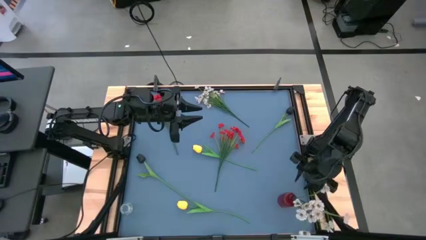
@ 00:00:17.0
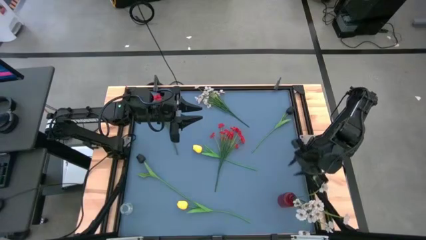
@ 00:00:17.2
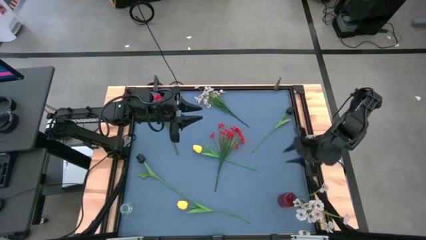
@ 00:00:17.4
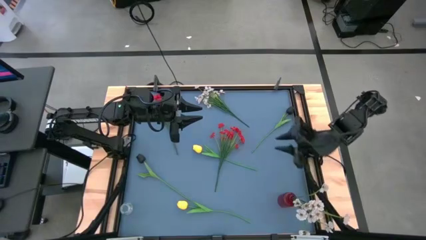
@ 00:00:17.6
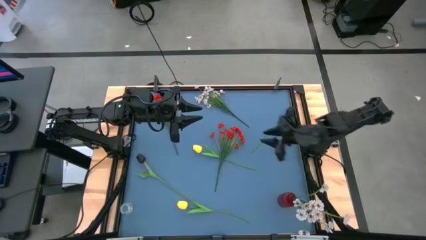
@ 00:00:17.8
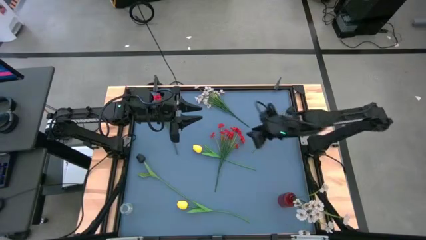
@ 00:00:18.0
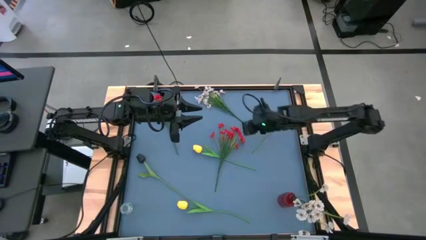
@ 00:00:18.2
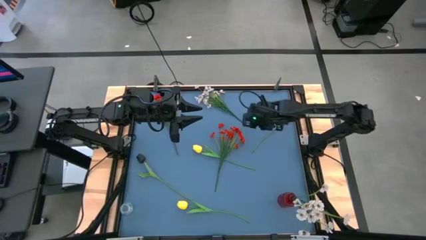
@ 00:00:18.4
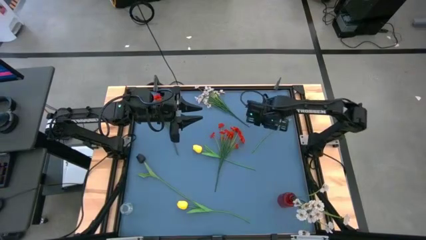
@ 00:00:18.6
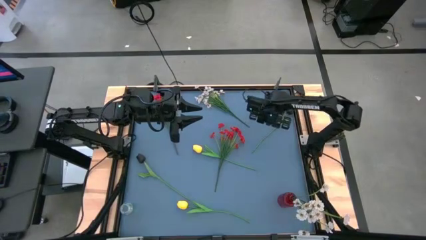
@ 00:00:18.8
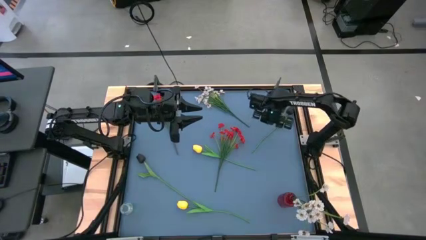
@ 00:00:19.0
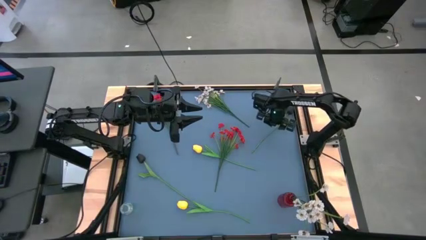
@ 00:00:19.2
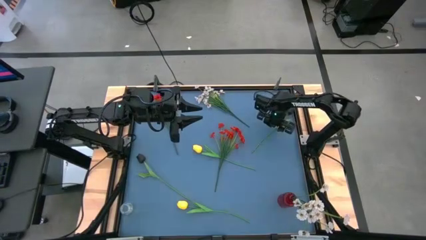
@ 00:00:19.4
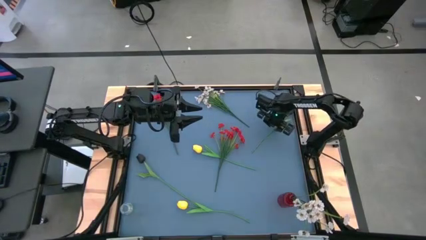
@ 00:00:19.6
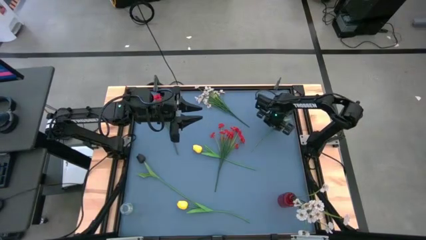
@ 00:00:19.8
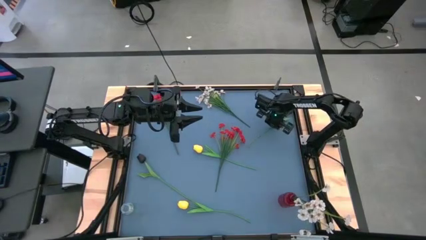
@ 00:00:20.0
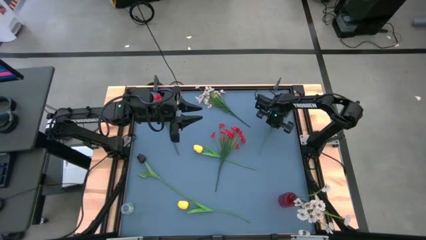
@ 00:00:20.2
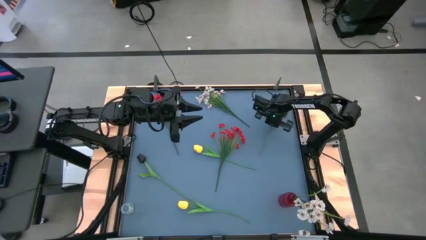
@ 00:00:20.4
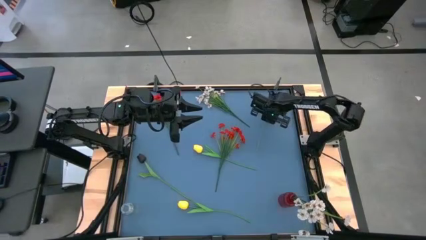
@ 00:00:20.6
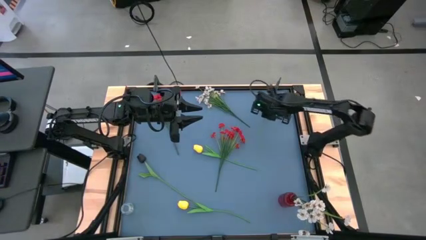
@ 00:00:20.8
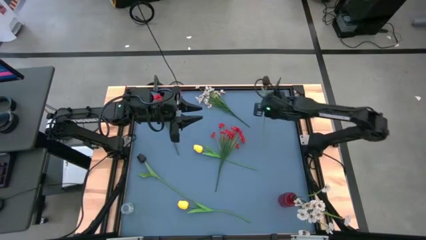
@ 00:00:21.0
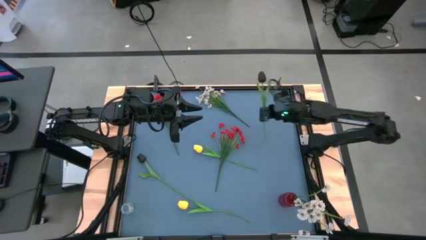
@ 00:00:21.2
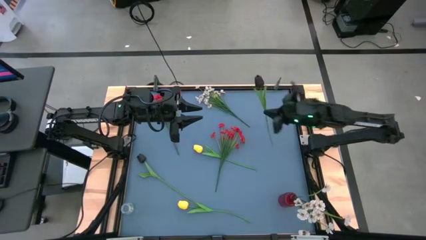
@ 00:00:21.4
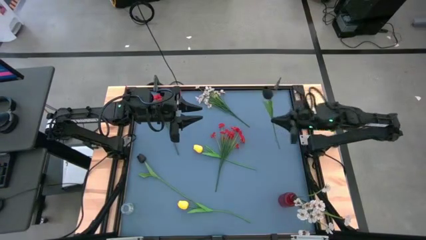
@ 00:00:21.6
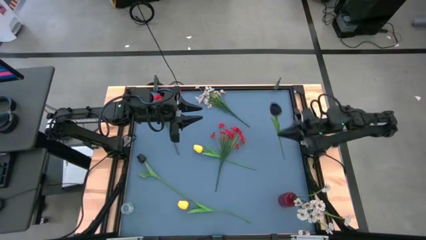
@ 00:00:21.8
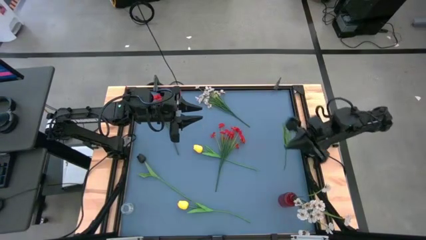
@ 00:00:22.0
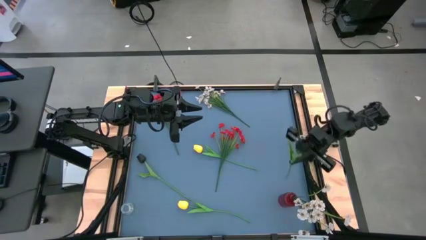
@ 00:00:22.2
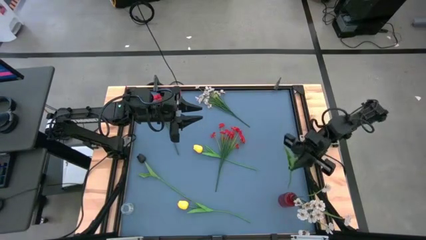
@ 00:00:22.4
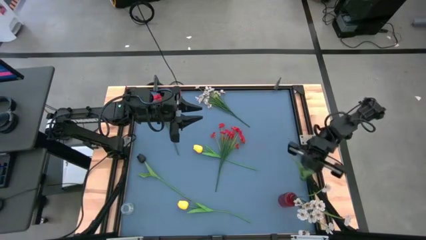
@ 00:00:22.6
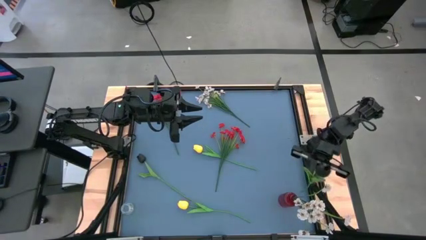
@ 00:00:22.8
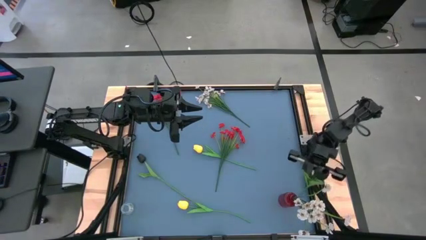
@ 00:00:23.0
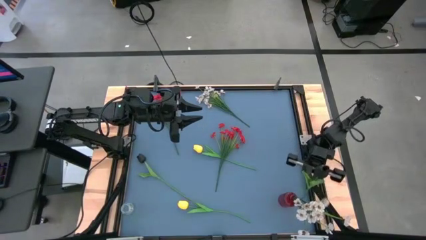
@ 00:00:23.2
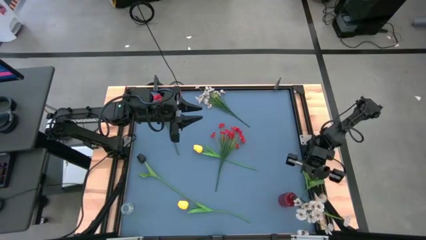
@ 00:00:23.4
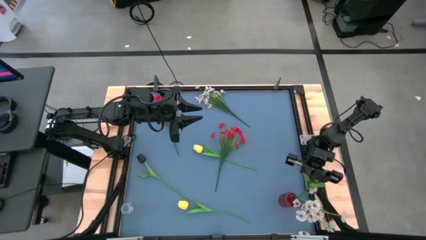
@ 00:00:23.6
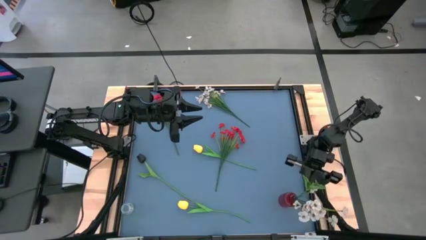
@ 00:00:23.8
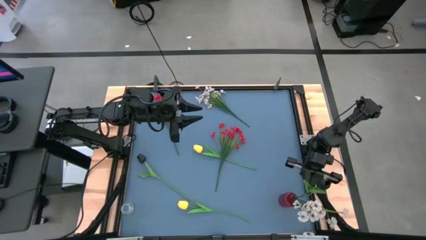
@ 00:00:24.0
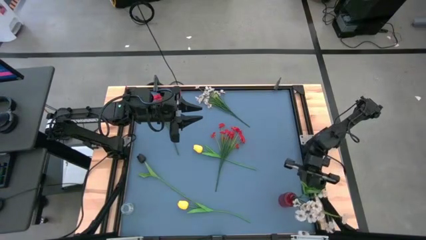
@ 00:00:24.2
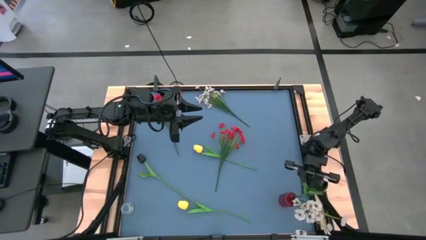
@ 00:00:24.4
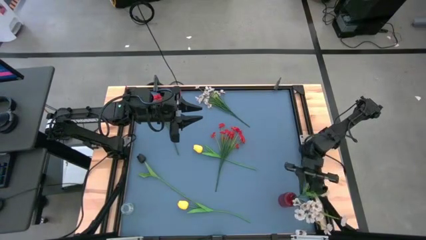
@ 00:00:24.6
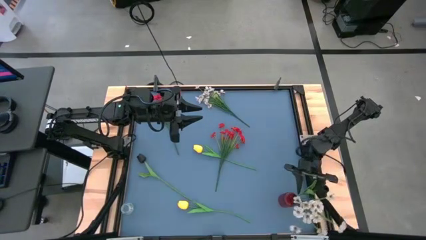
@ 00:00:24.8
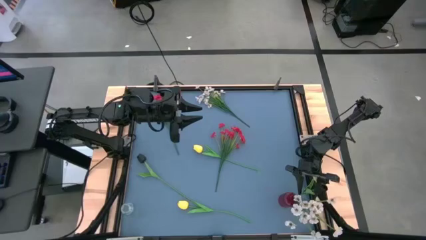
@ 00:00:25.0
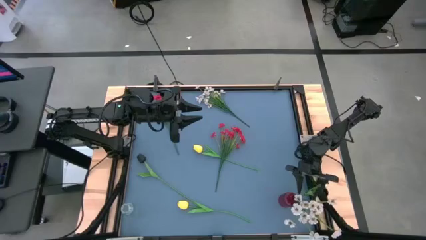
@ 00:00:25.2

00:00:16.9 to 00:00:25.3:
Task: Sort flowers into vase by color
Put the top black tulip into the red vase

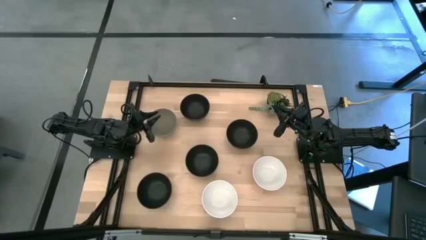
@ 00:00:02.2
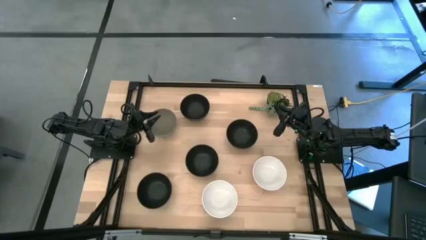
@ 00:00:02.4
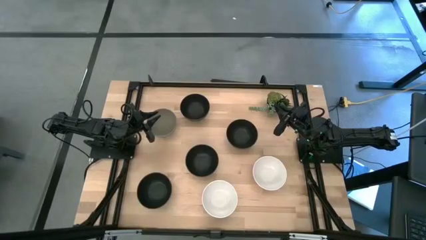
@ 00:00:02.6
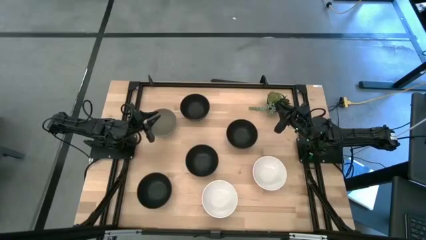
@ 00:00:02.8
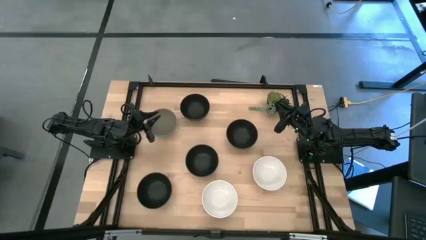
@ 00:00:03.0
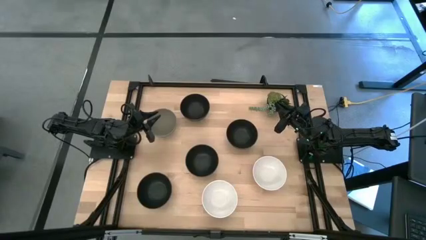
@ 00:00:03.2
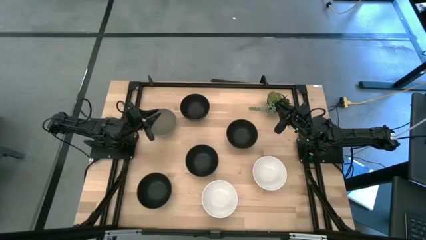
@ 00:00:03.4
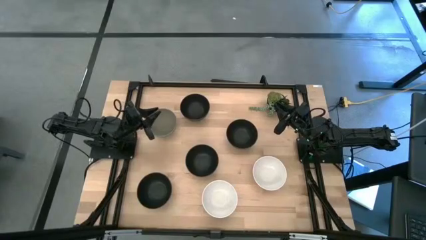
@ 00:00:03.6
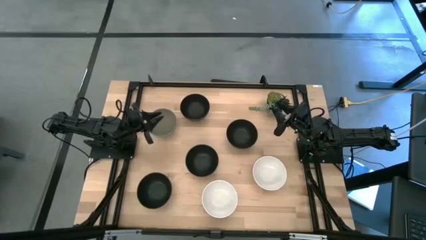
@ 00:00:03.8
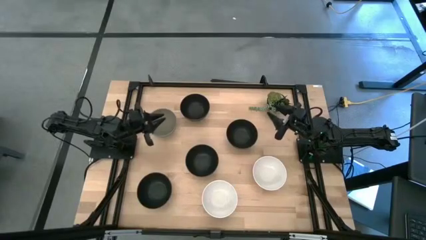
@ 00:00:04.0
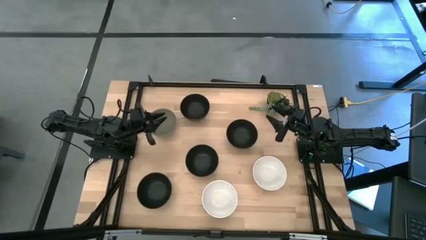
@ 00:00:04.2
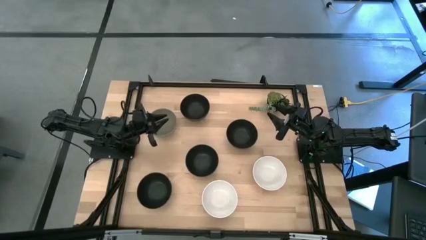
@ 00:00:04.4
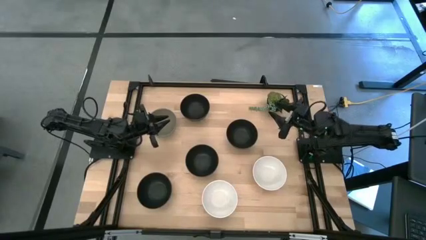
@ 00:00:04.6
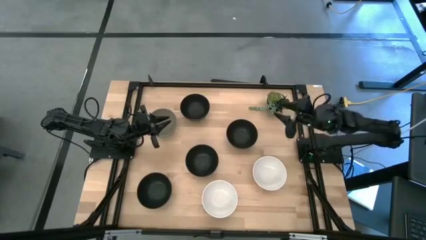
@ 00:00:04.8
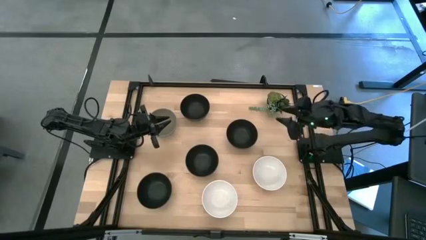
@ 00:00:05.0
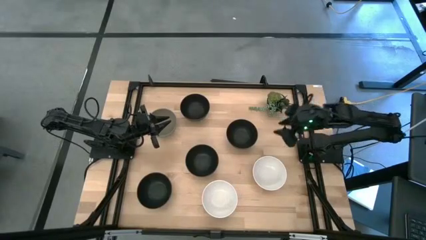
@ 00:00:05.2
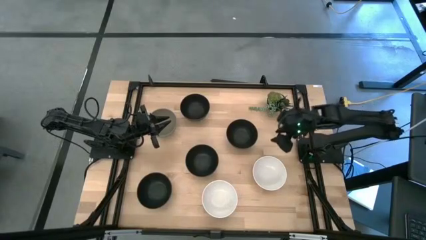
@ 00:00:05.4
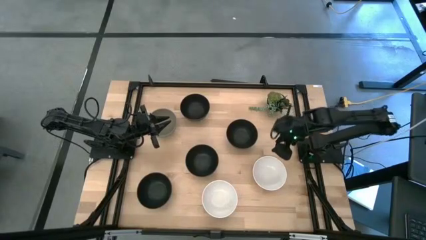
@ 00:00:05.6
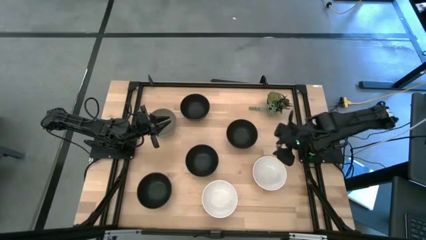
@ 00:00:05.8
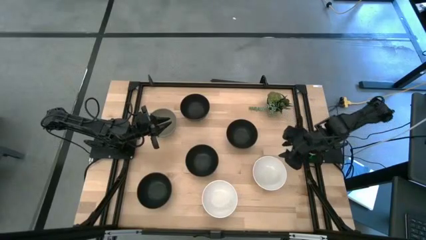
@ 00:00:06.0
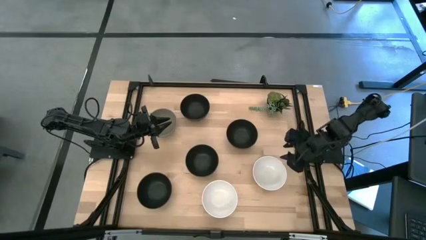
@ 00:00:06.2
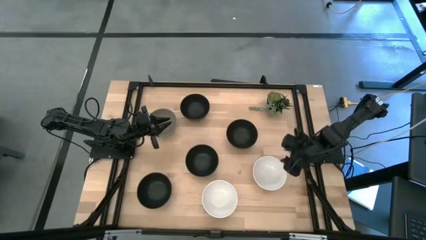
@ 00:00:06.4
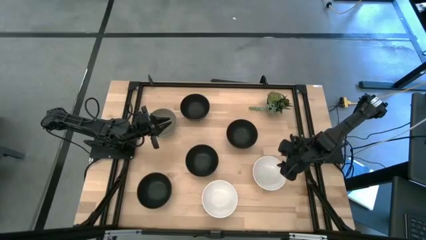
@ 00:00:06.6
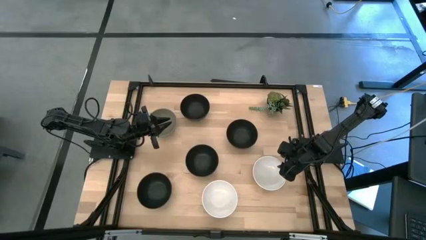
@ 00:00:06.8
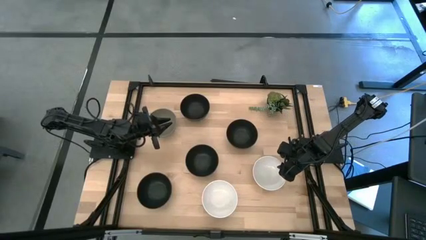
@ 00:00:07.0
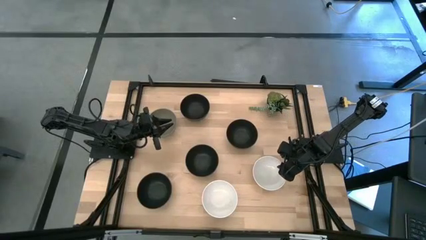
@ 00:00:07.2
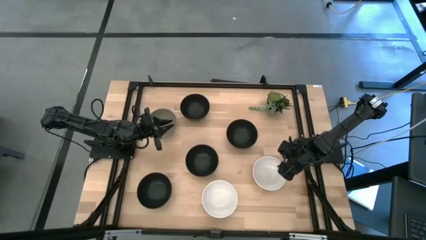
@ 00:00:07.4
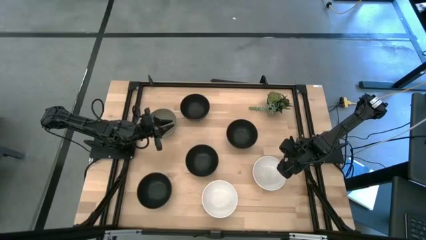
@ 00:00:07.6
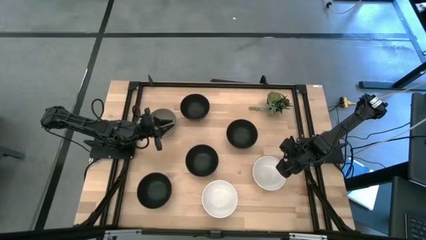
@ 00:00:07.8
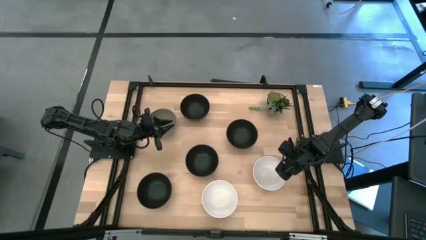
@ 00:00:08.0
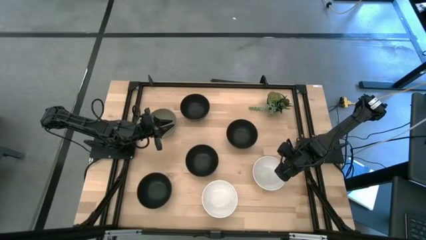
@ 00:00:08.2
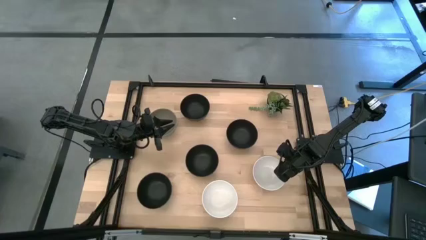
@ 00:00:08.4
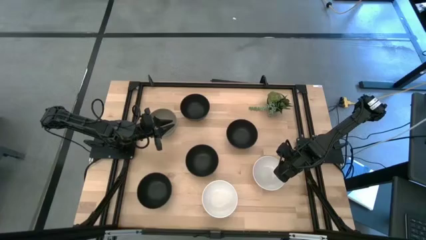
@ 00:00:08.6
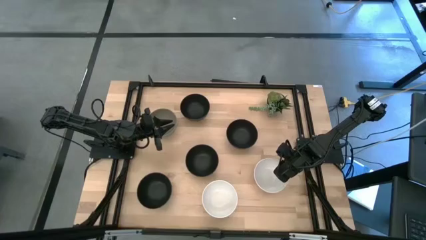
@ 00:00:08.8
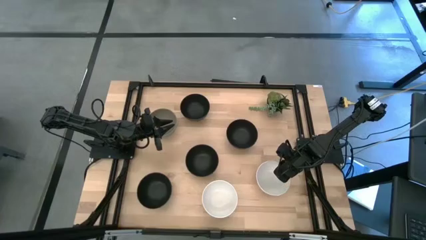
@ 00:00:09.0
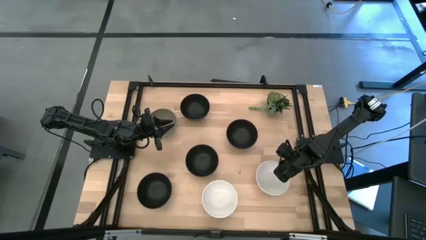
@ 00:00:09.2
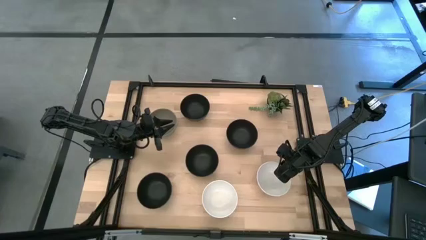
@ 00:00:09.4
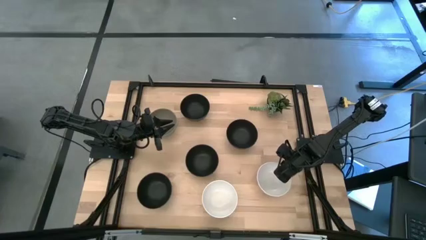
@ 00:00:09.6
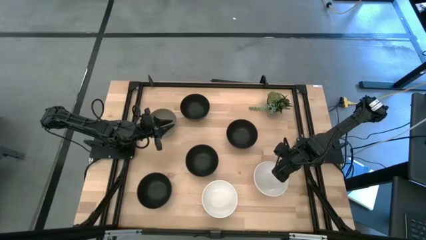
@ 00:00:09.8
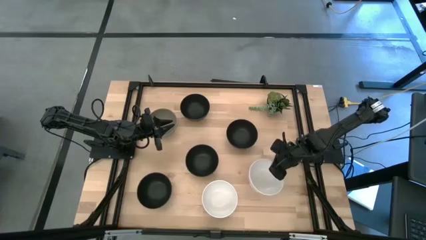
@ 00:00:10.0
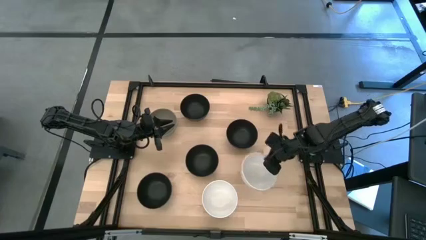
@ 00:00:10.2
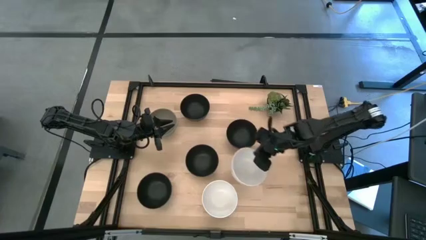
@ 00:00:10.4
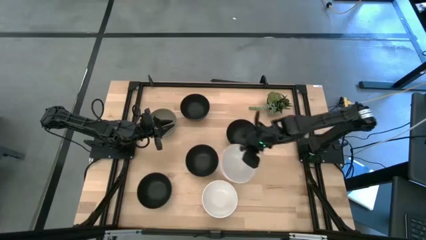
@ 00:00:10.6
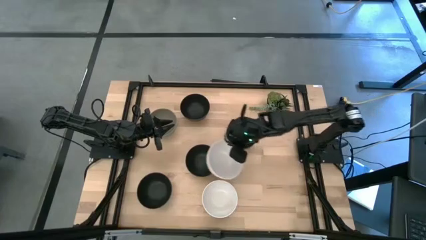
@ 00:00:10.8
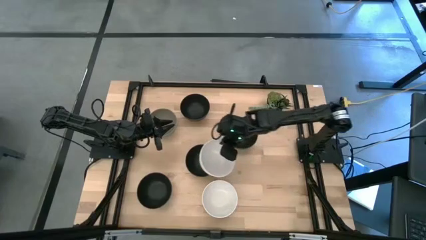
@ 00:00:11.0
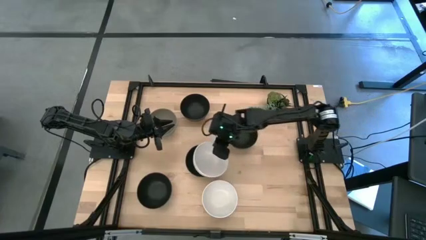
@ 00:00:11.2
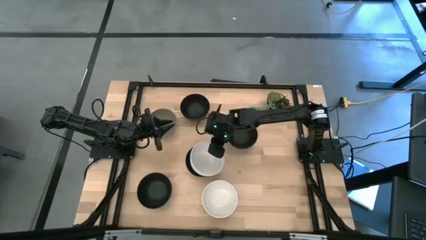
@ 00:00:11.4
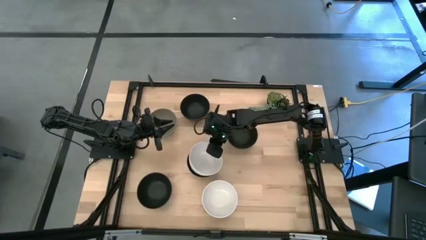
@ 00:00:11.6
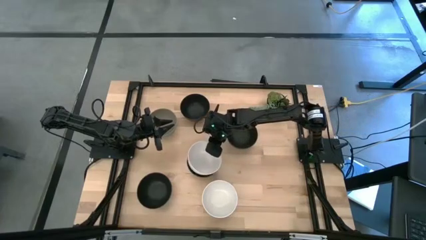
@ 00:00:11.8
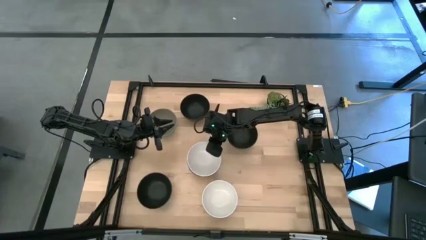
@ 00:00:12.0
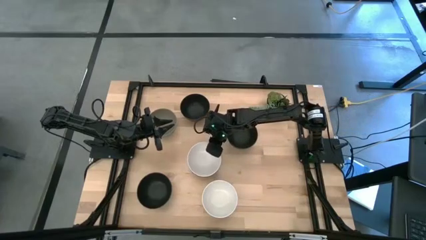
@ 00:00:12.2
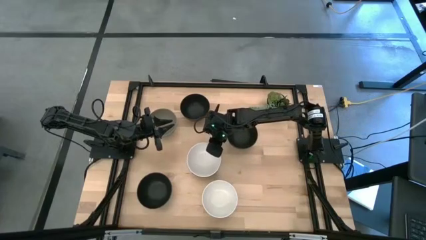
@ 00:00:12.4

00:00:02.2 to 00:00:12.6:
Task: Nest bowls inside each other
Stack the white bowl on top of the black bowl
